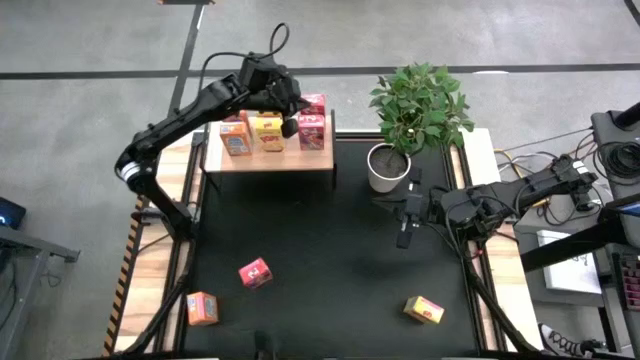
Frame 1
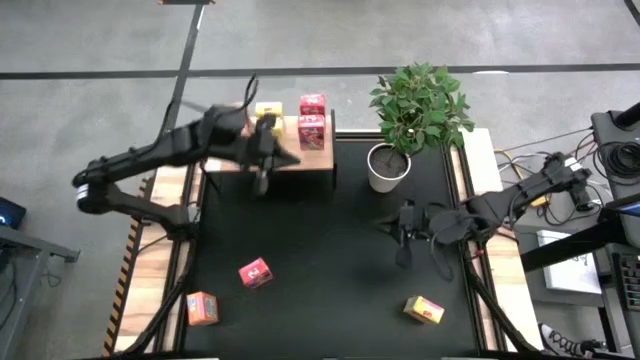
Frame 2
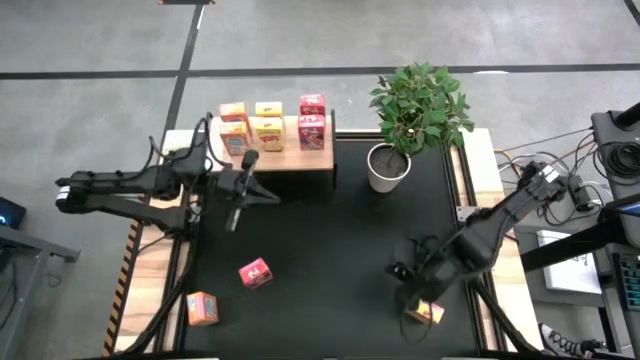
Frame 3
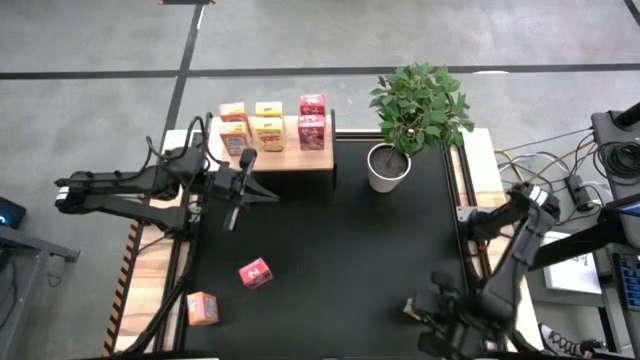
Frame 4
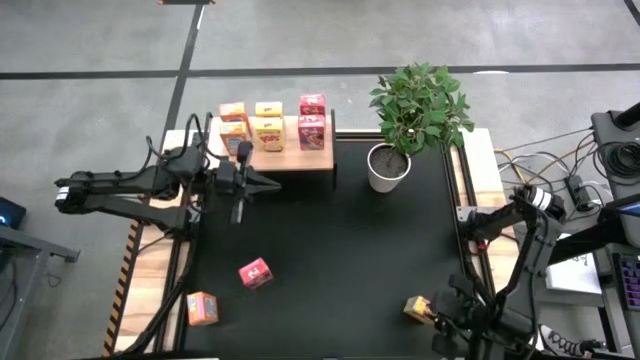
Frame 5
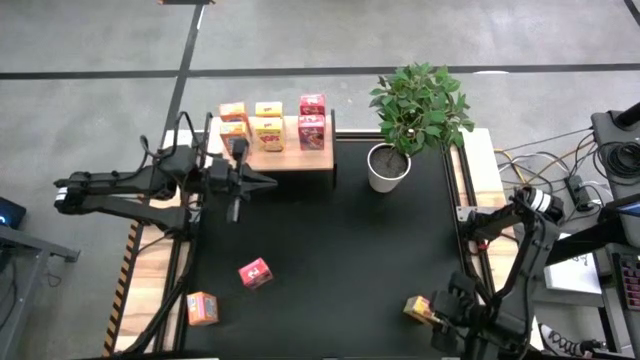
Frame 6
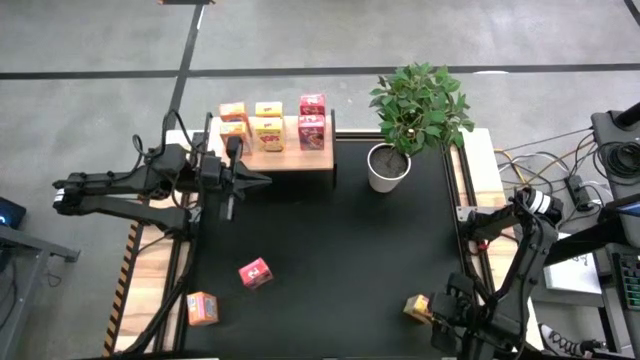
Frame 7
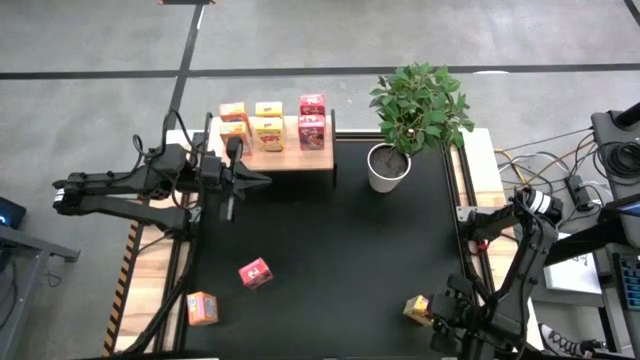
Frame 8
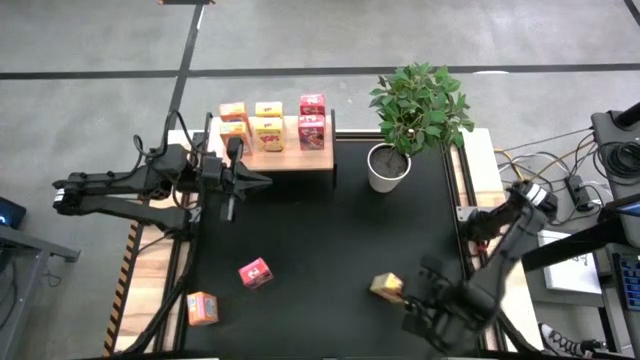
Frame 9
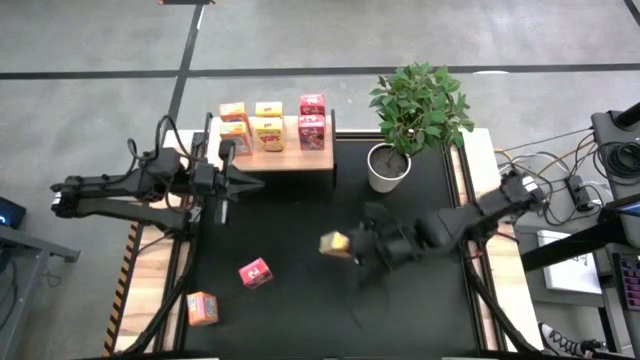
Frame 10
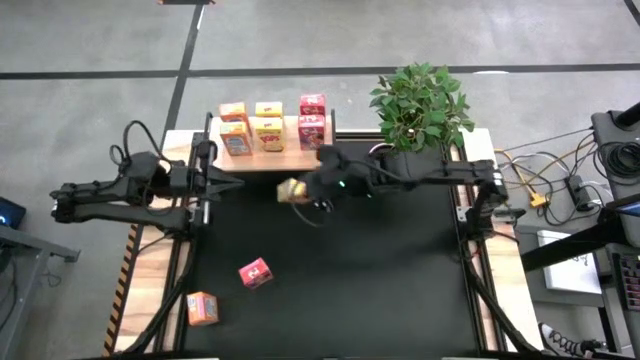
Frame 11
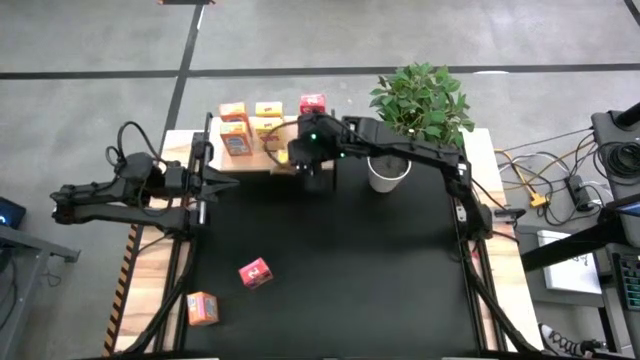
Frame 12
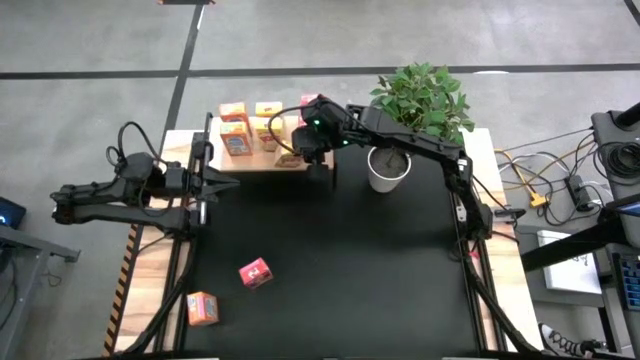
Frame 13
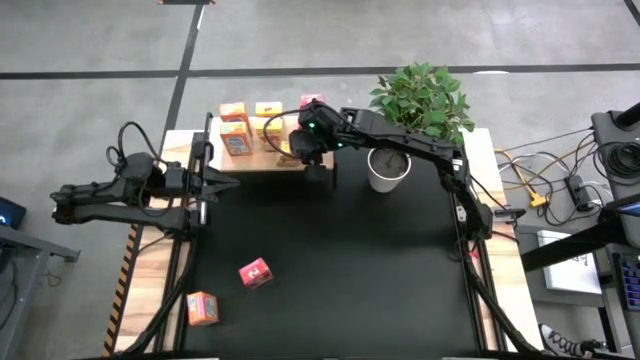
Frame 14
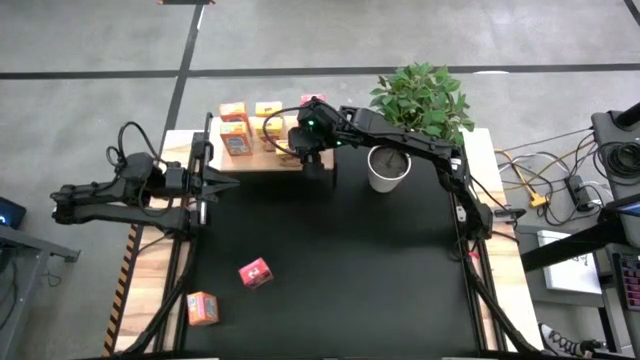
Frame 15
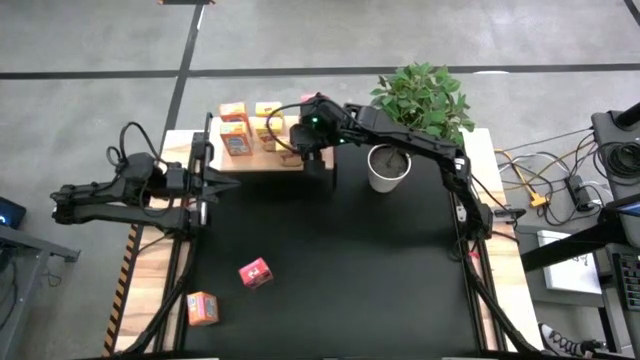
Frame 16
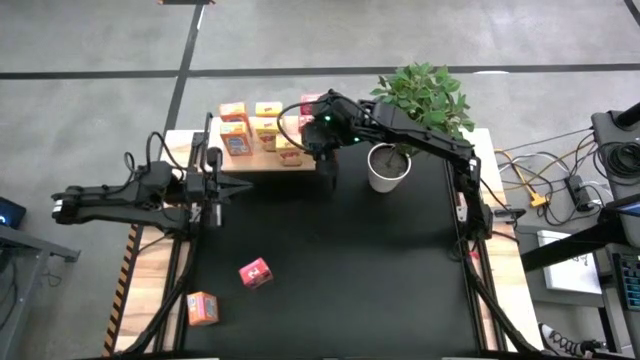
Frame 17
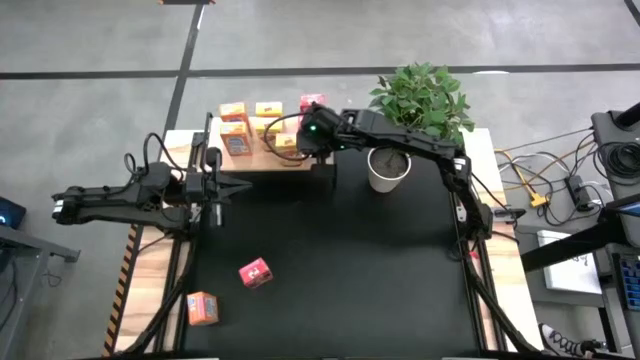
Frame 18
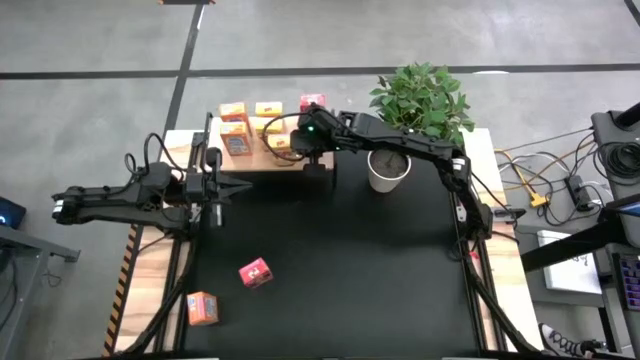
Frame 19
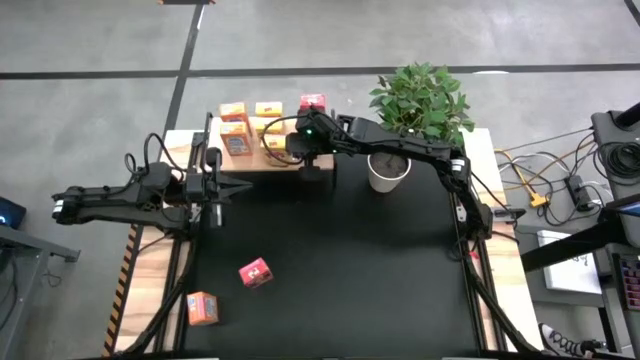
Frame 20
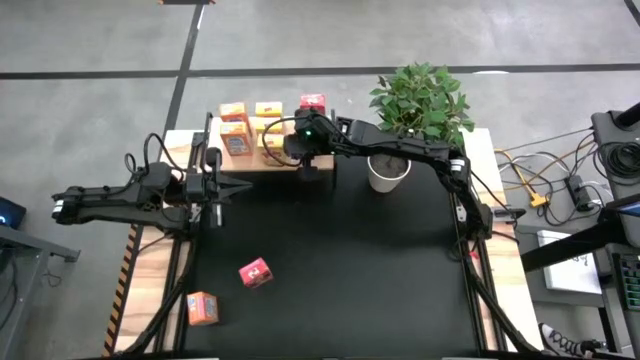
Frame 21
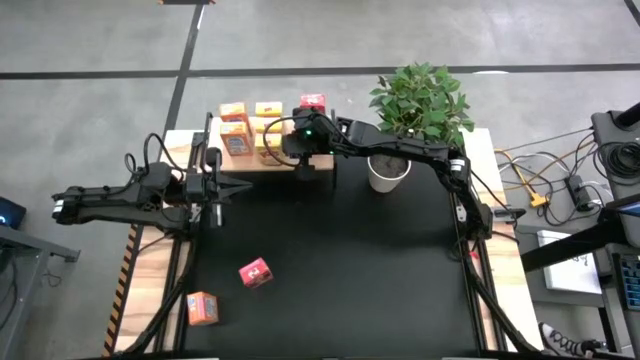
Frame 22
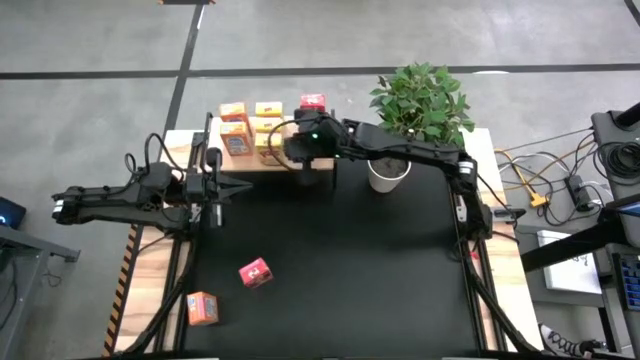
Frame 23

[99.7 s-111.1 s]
Task: Stack cereal on shelf
Put the bottom yellow cereal box on the shelf

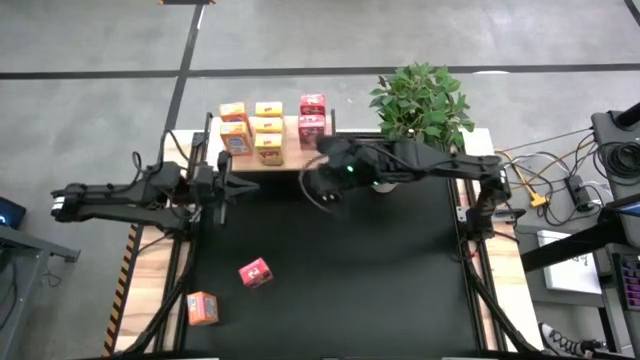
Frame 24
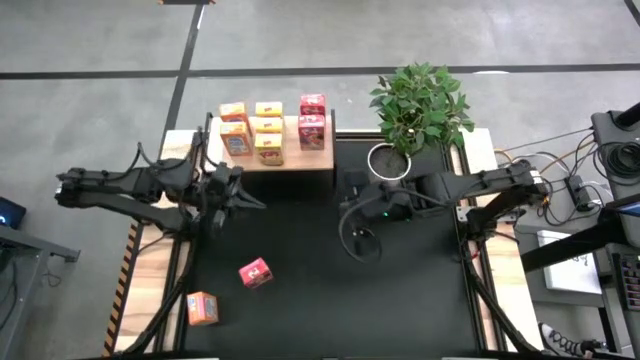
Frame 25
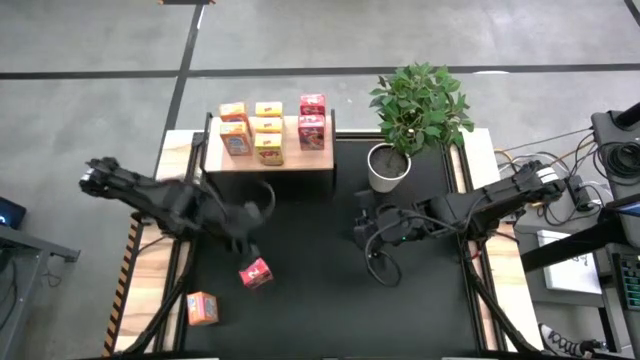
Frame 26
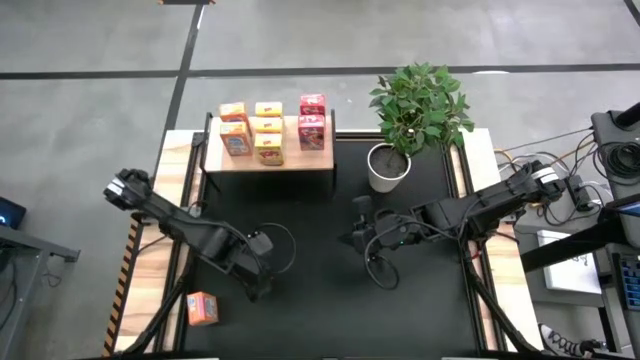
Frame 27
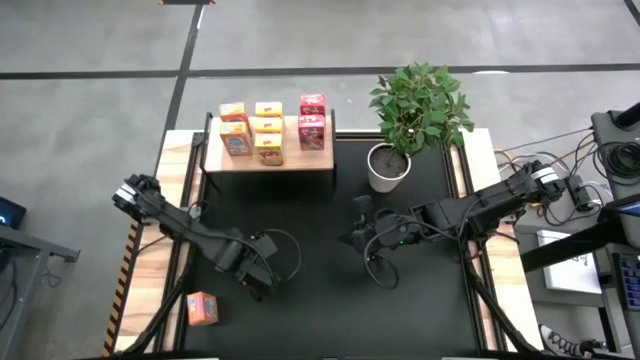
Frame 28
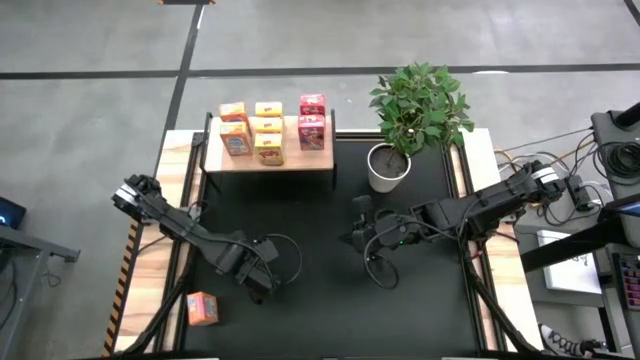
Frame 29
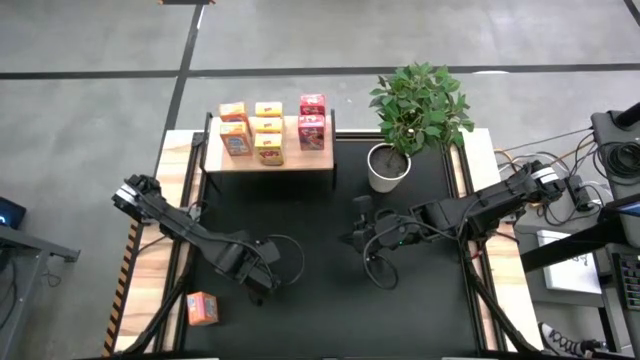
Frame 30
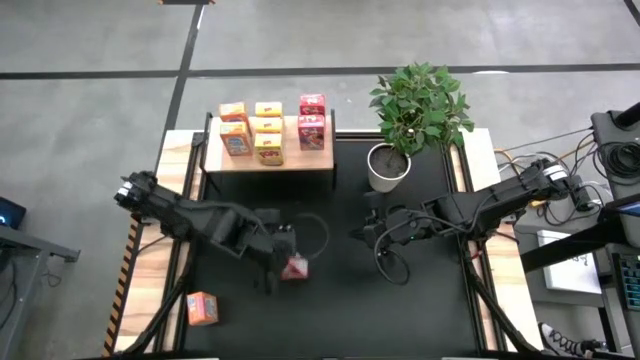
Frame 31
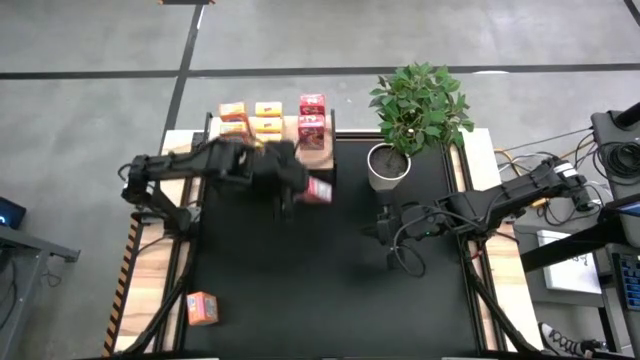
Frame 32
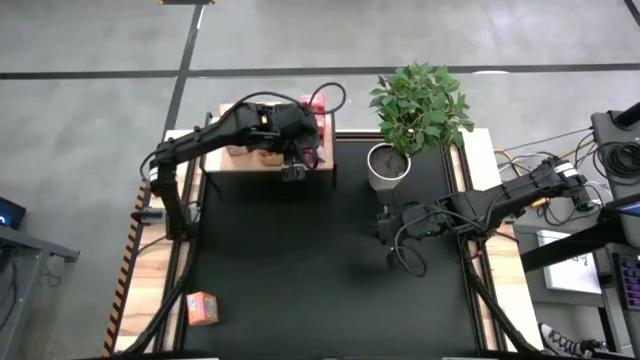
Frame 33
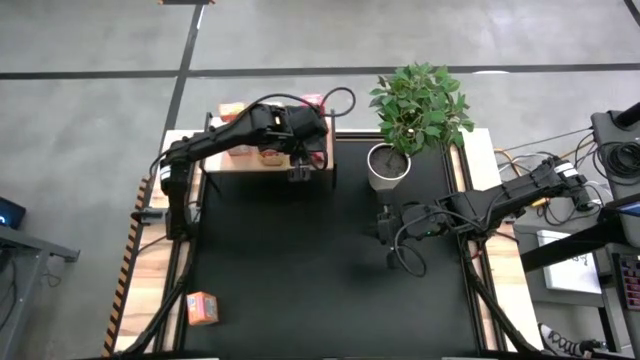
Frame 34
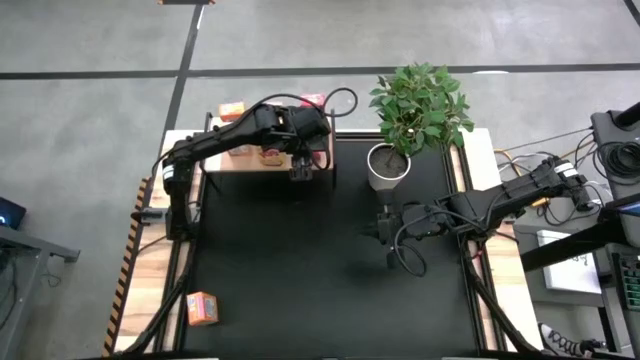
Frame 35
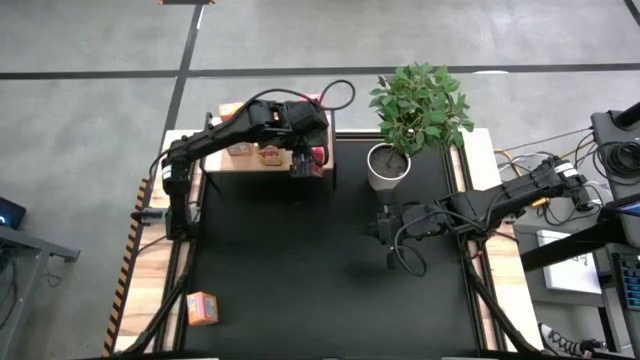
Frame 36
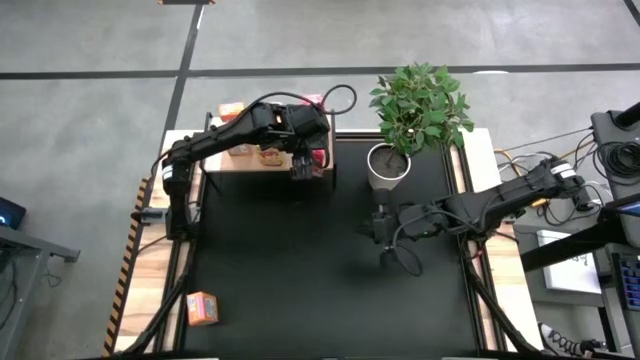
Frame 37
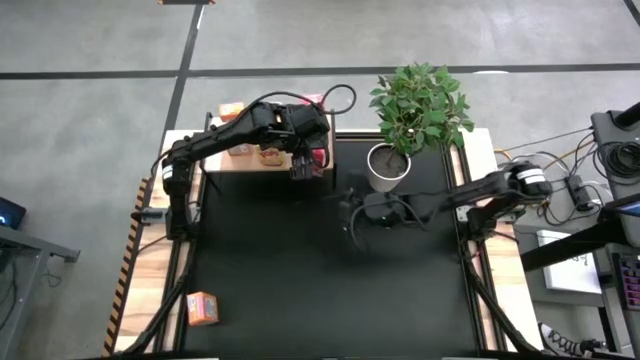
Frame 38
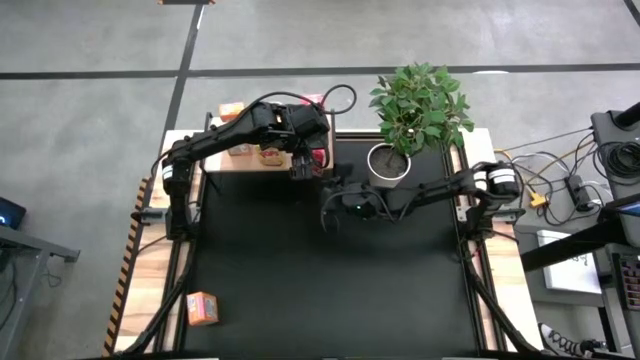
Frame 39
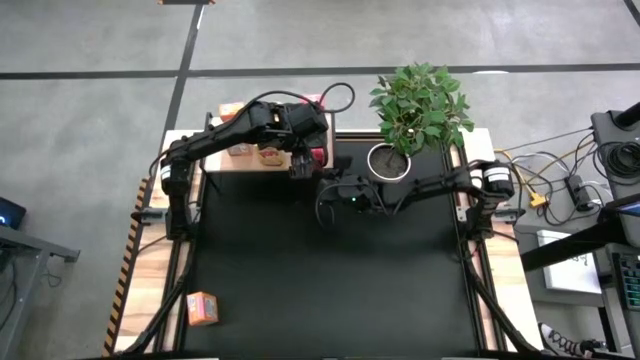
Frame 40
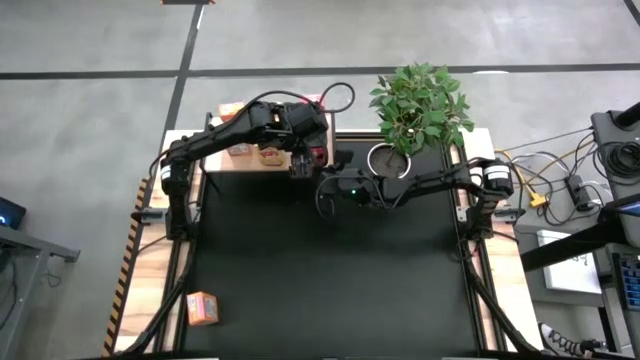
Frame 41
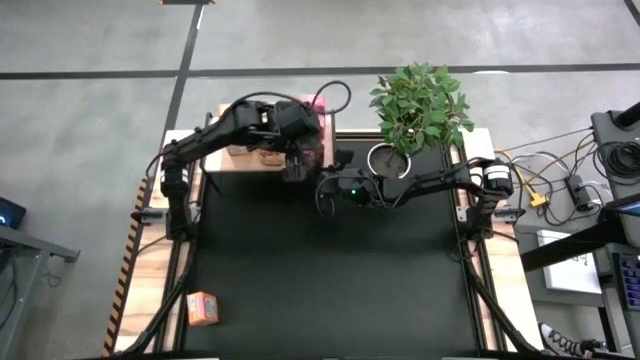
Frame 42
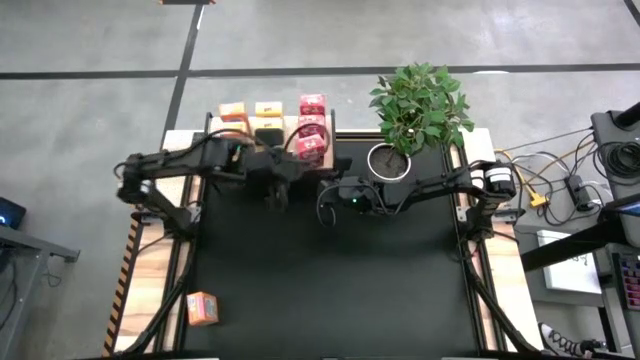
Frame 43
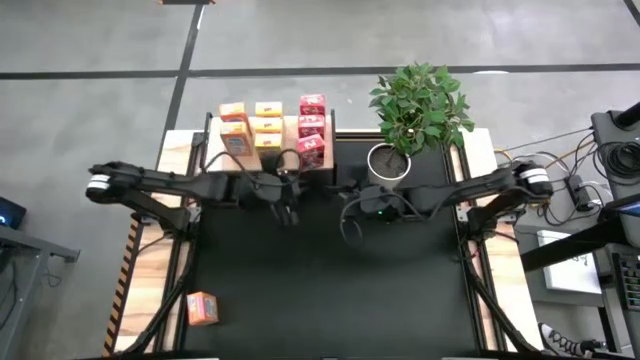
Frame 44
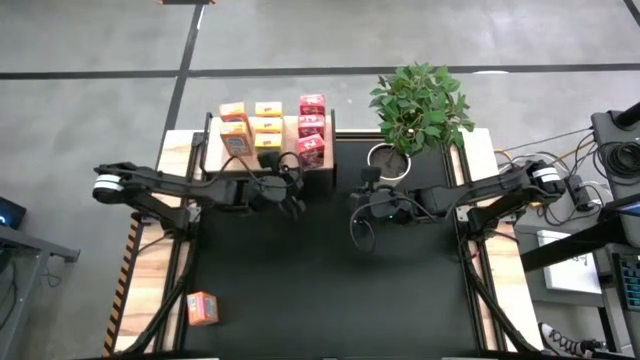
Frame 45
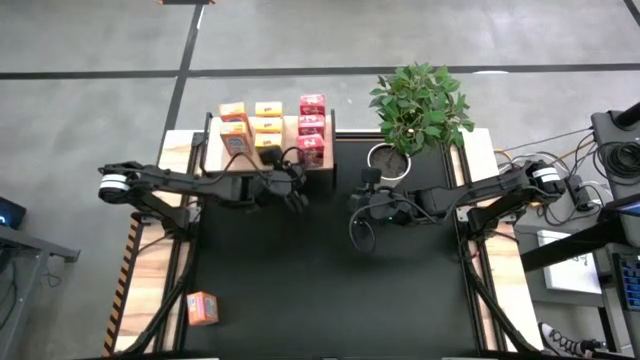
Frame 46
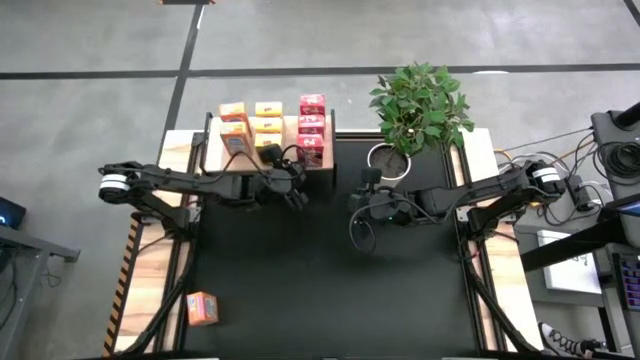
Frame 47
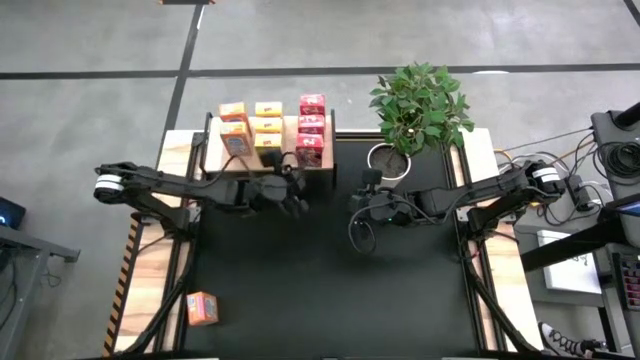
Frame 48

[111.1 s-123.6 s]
Put the bottom left red cereal box on the shelf
